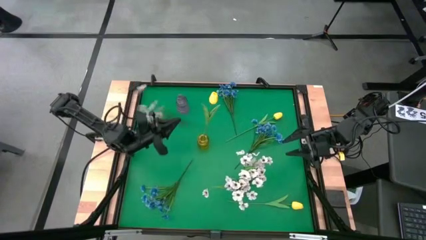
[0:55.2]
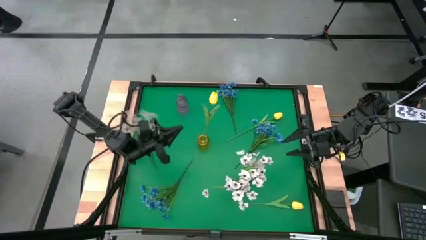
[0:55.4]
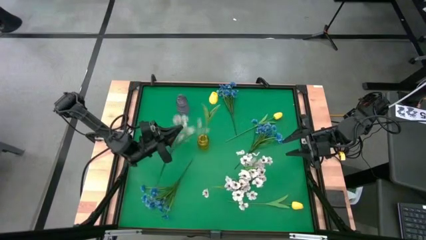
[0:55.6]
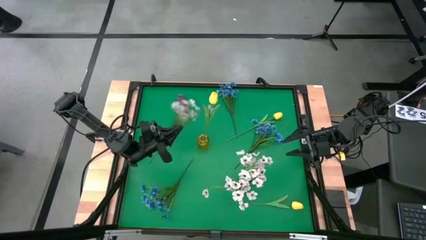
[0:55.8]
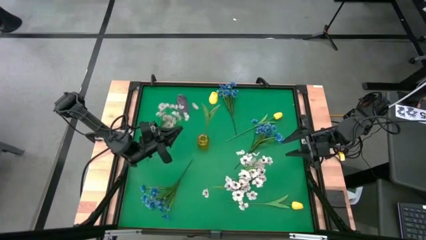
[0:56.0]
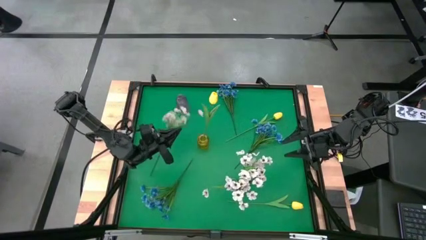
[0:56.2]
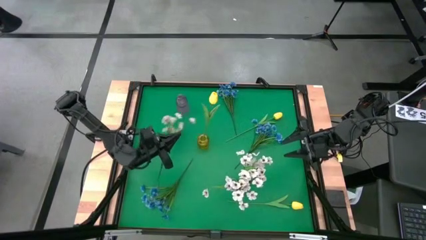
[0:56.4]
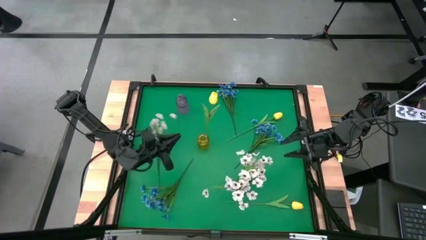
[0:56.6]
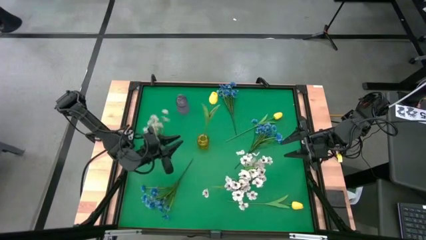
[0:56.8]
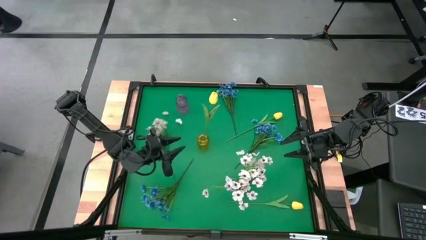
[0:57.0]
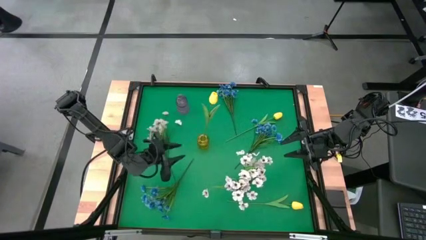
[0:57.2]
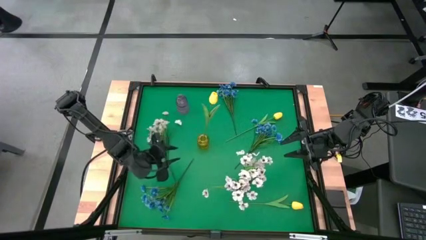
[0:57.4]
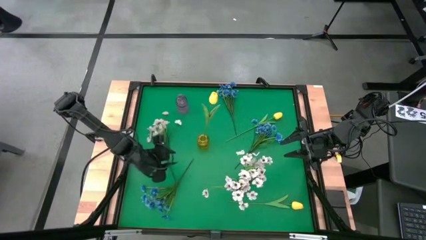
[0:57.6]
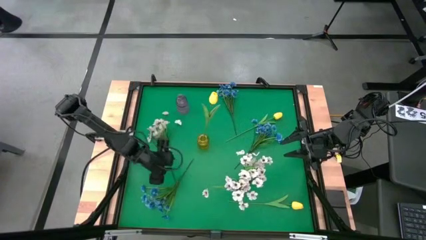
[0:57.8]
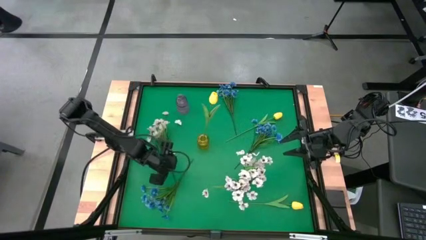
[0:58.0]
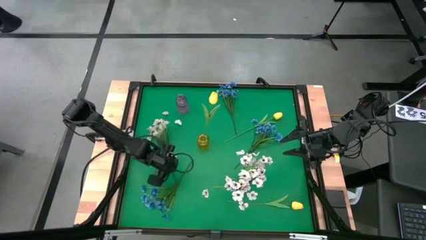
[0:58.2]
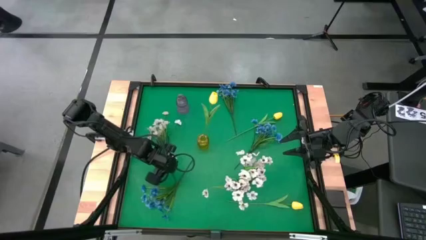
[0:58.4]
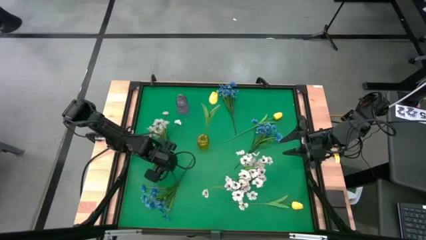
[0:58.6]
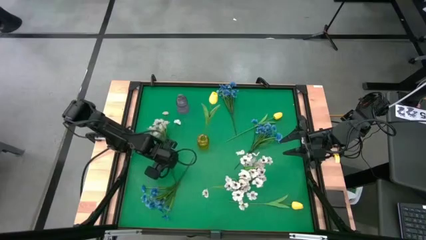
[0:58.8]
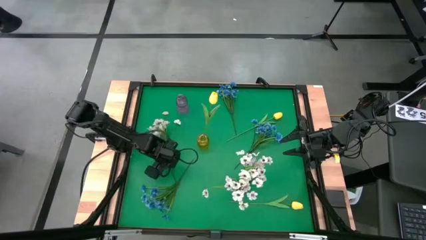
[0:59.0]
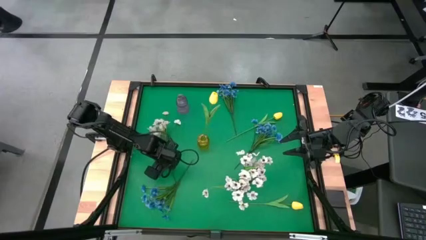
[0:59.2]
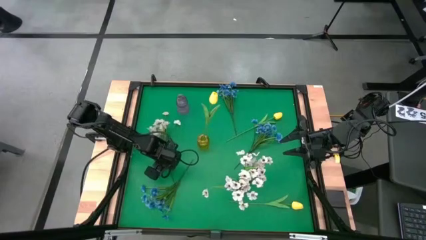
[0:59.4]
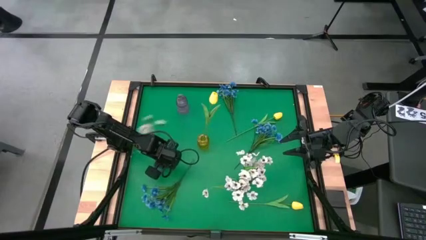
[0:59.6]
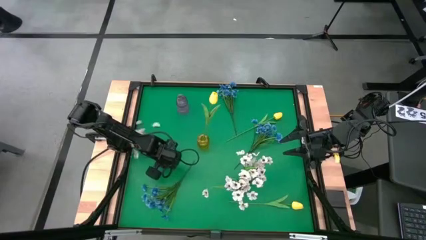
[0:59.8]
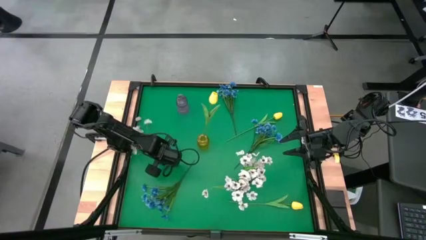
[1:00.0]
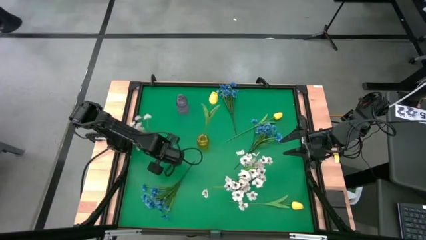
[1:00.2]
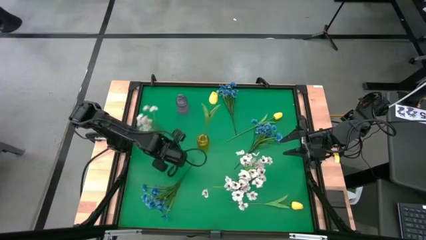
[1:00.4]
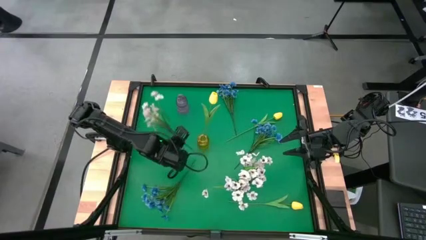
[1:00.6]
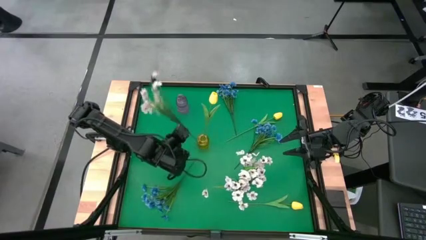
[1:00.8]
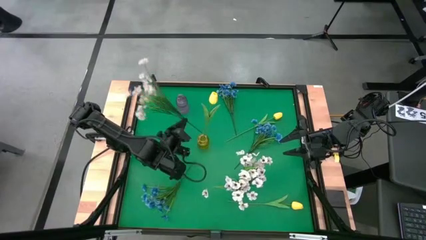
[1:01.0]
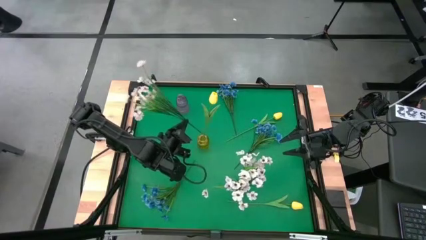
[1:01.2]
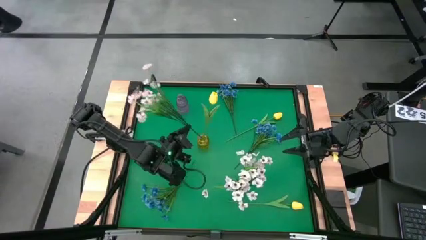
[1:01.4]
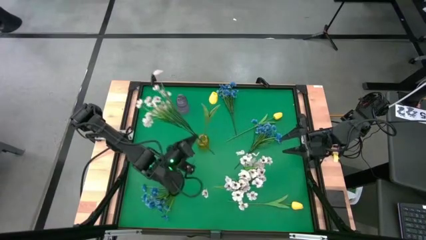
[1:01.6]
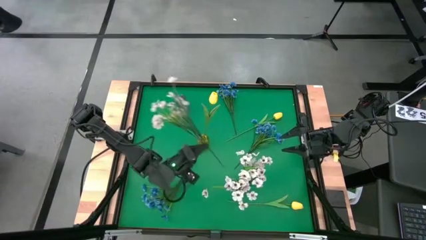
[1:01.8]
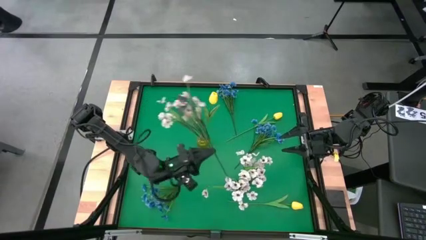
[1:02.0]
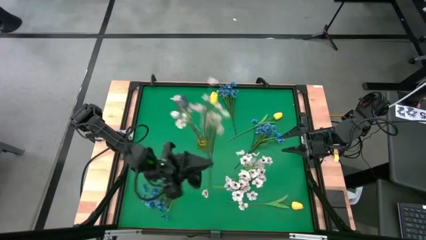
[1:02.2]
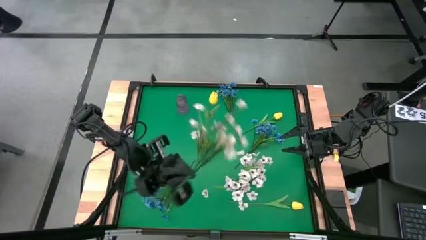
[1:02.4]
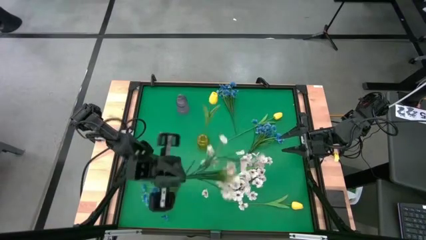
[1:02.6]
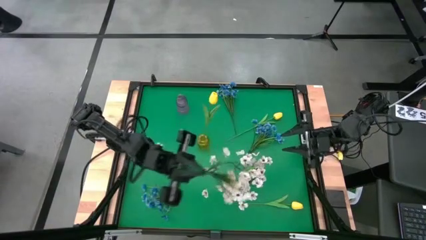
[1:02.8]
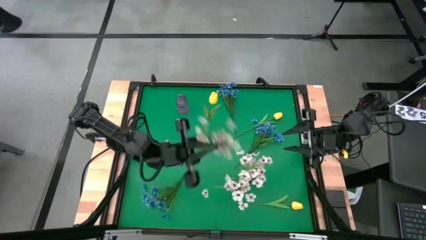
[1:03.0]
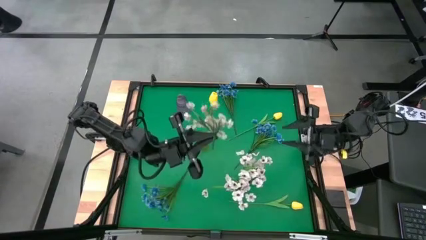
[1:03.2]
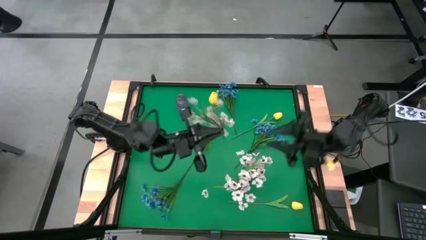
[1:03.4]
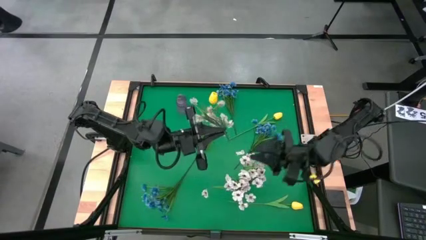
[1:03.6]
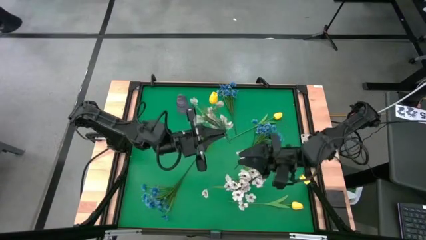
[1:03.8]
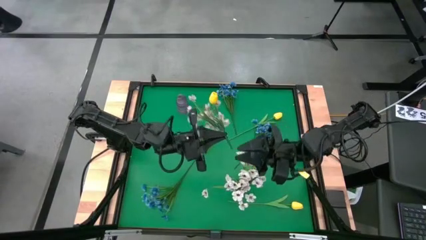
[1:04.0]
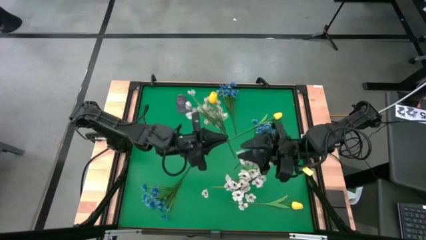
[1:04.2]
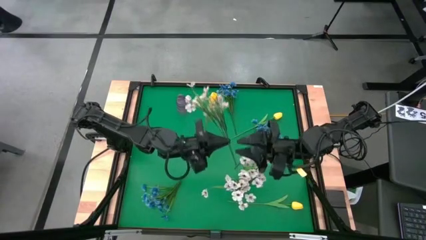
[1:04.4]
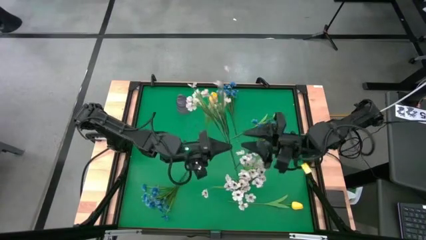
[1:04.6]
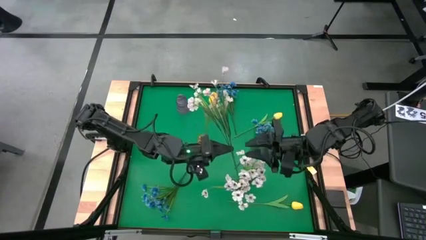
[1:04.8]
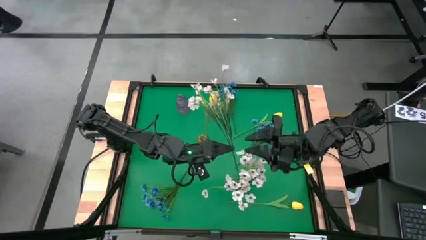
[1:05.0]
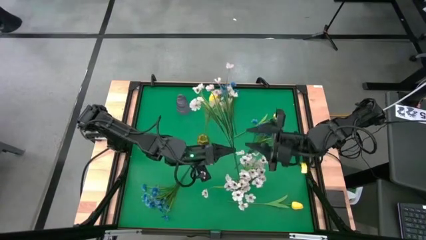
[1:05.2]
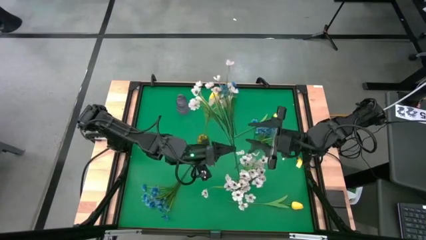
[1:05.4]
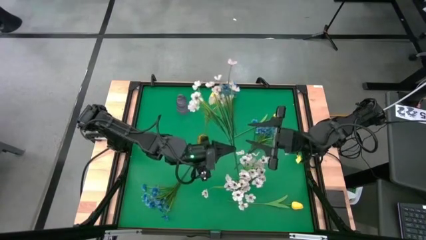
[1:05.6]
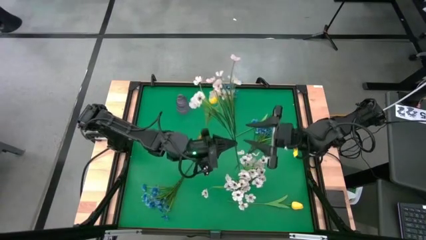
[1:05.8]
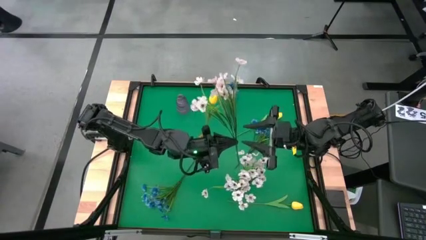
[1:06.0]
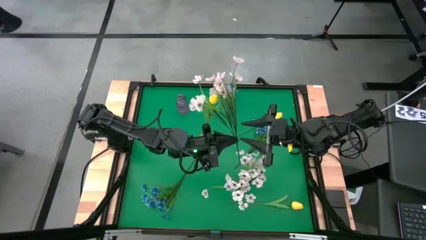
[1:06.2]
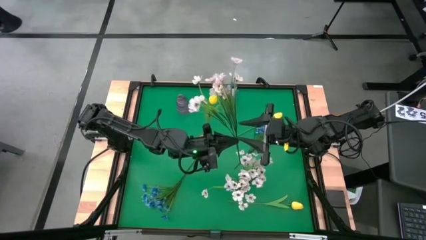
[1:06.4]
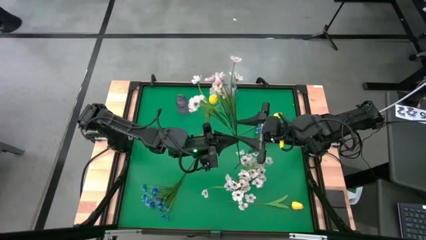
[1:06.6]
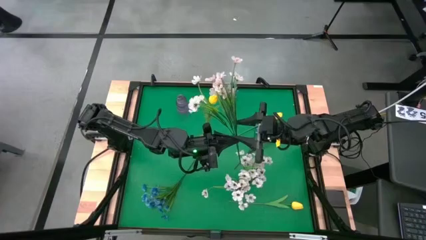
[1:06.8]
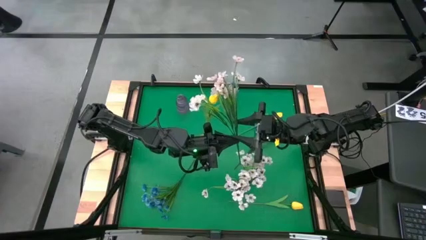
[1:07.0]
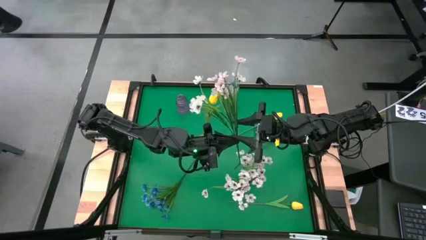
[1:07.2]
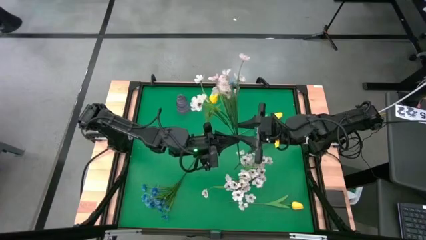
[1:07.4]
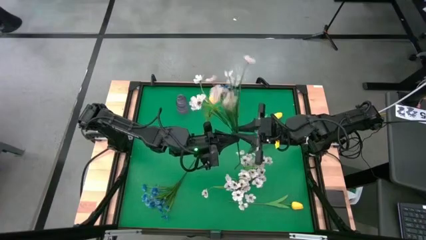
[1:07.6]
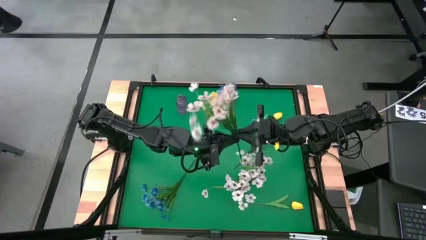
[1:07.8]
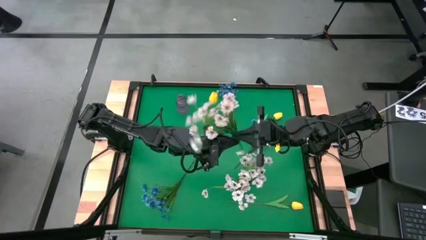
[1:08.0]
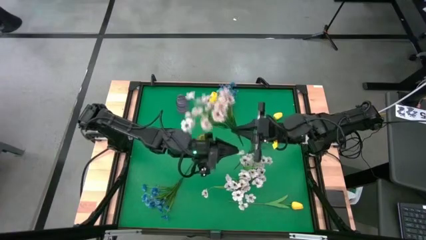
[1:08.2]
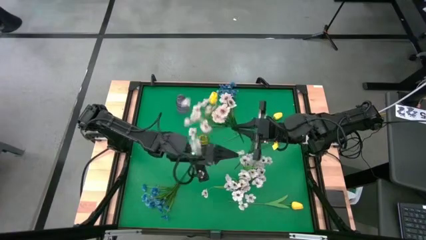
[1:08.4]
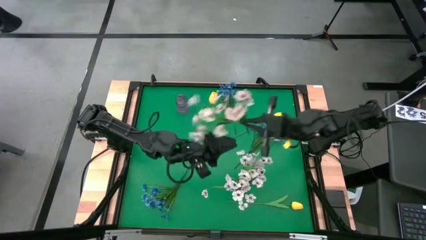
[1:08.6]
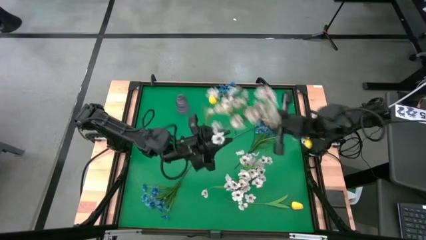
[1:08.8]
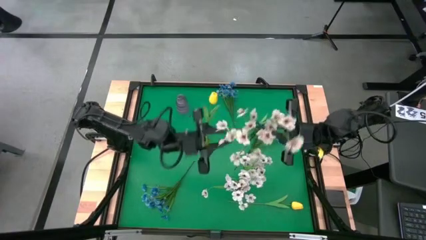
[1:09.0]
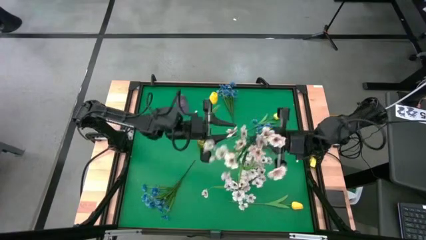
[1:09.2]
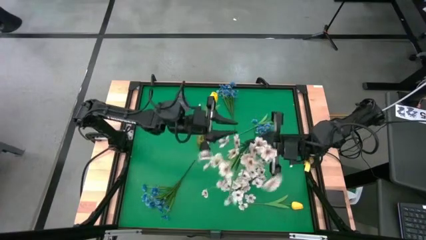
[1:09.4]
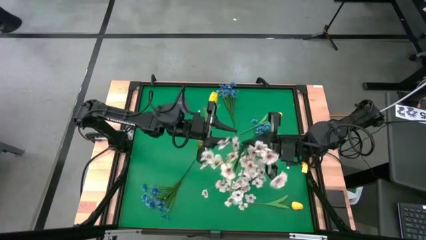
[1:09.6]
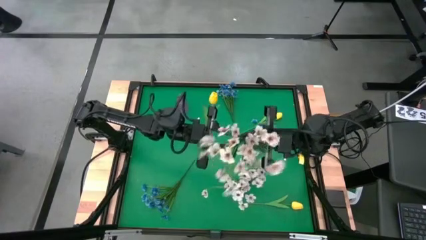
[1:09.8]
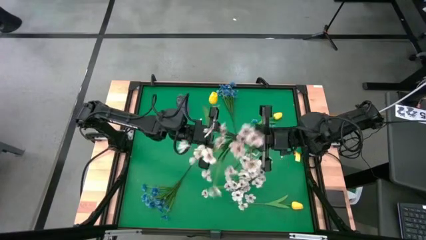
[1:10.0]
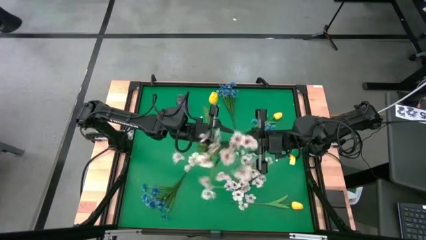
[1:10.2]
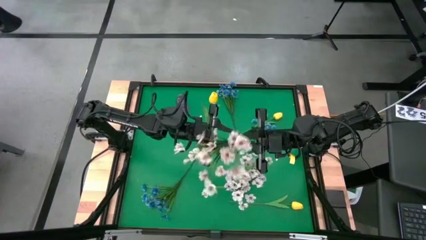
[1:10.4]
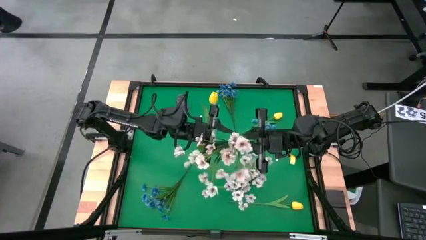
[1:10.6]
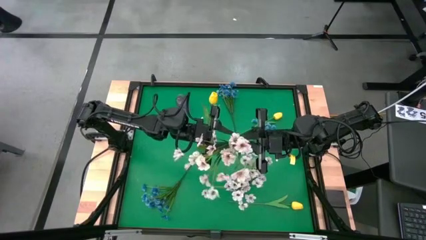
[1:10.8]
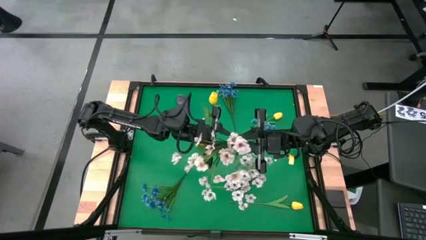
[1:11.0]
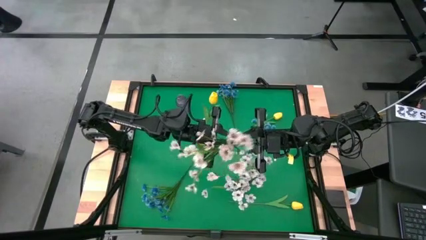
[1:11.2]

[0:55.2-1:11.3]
Task: Sort flowers into vase by color
Put the white flowers into the green vase

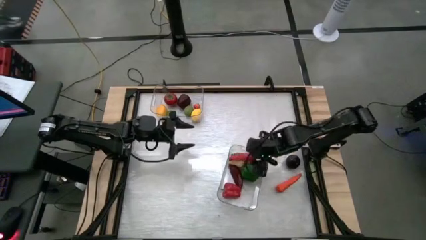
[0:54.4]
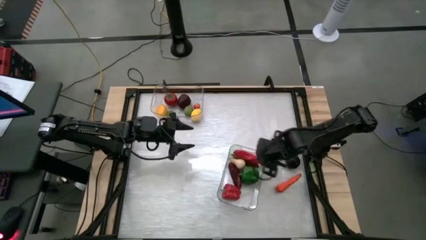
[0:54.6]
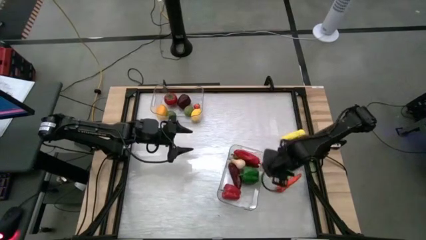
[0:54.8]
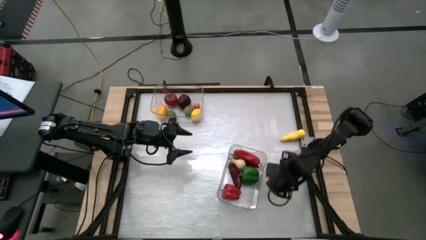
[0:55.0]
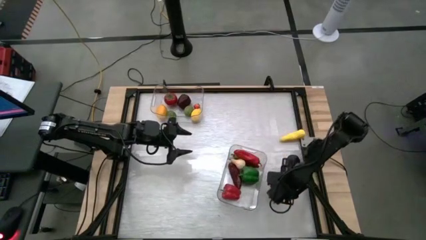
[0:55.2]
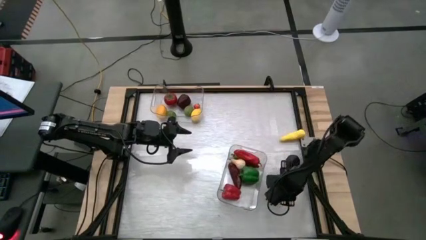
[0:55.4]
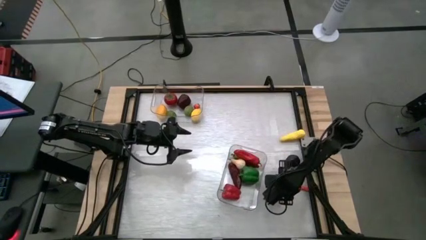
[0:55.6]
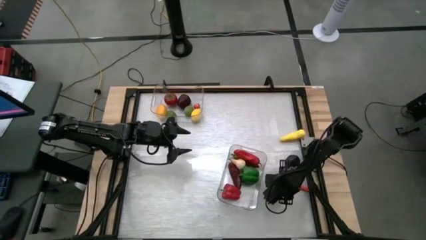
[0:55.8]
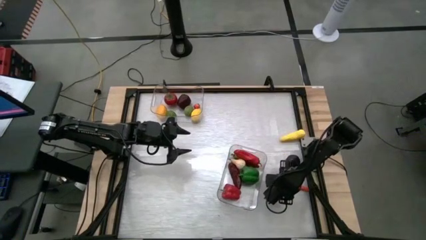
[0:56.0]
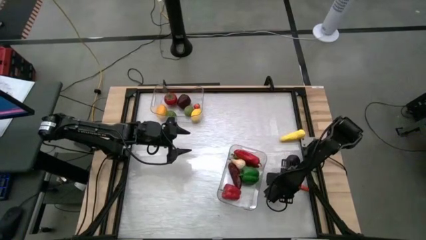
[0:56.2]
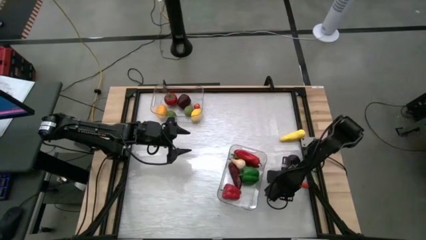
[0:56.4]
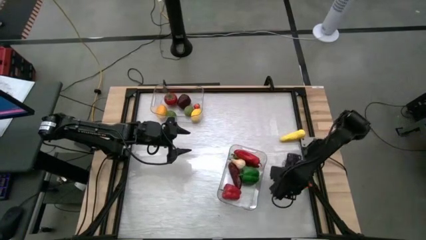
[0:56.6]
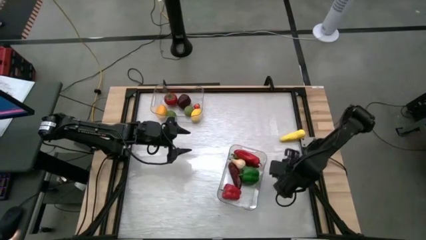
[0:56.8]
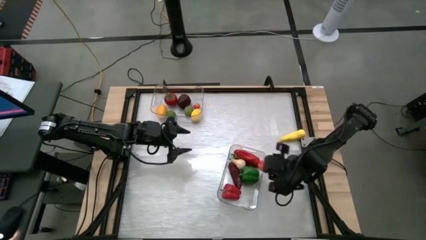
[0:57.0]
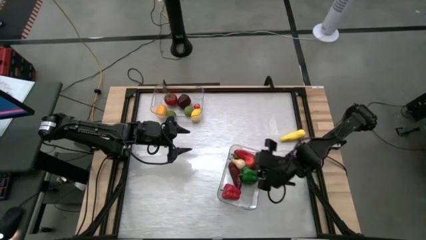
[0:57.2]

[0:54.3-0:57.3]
Task: Sort produce into baskets
Put the carrot into the bottom transparent bin
